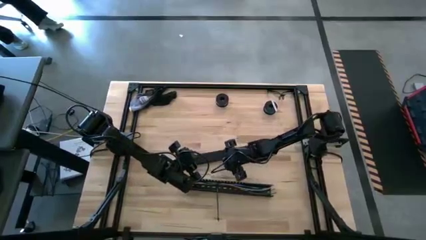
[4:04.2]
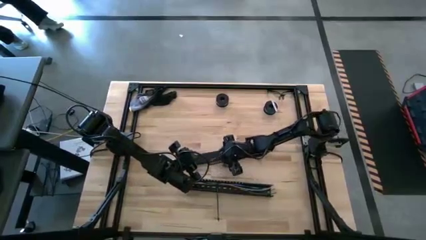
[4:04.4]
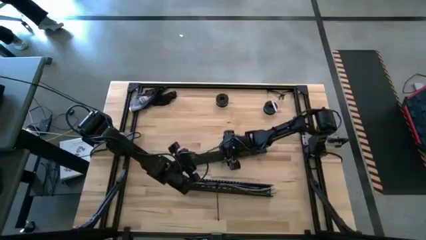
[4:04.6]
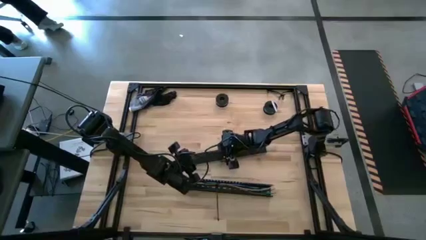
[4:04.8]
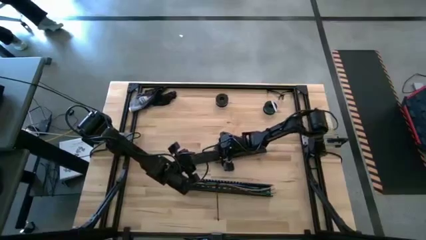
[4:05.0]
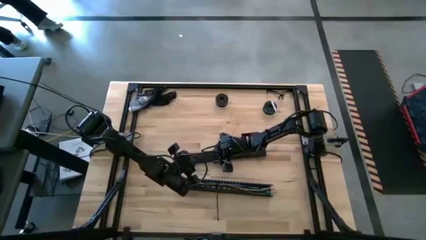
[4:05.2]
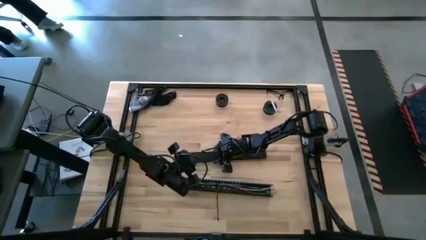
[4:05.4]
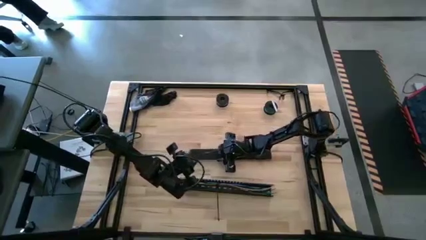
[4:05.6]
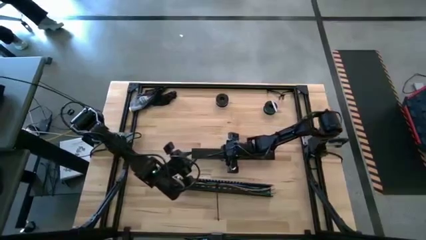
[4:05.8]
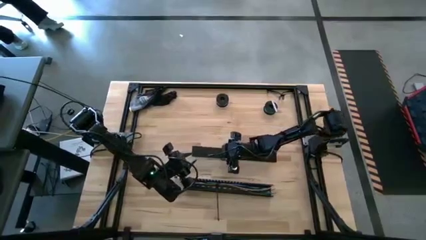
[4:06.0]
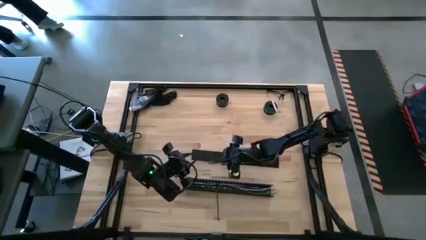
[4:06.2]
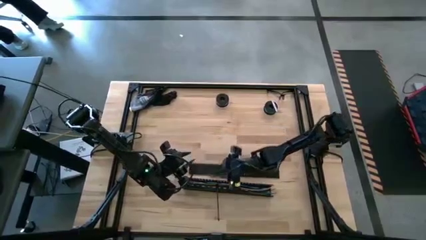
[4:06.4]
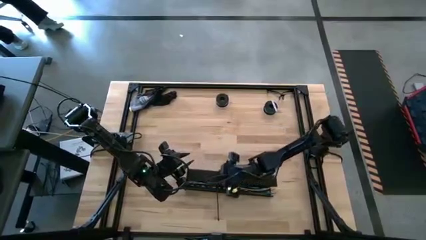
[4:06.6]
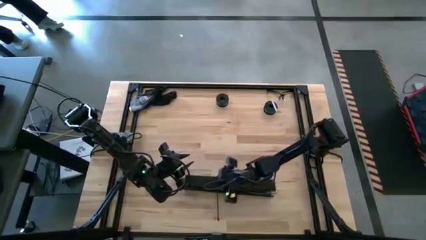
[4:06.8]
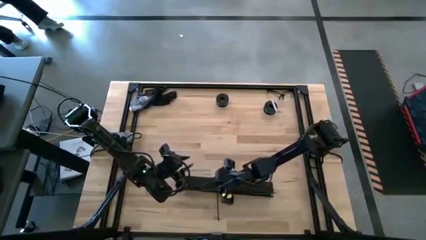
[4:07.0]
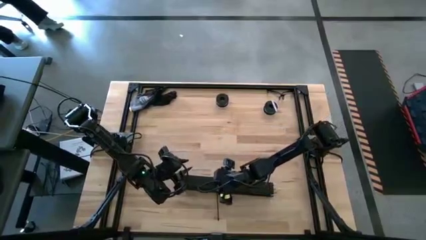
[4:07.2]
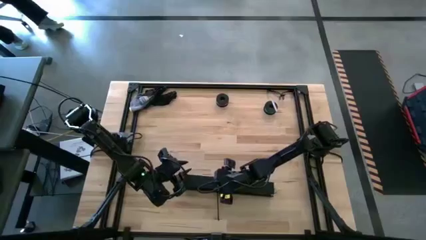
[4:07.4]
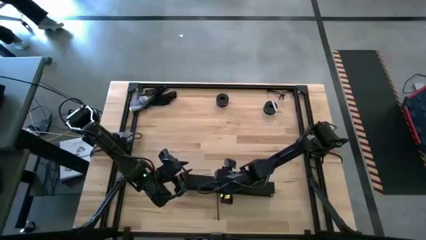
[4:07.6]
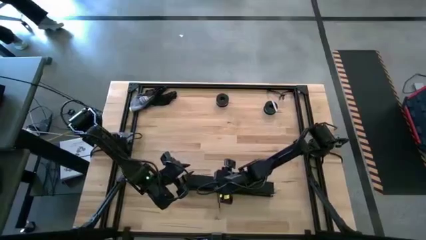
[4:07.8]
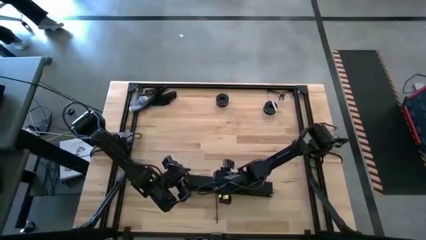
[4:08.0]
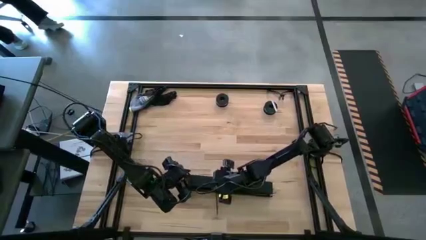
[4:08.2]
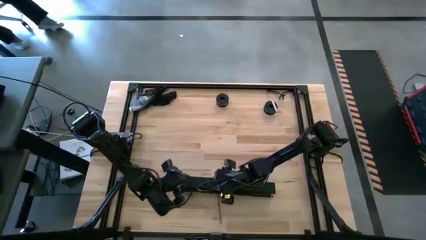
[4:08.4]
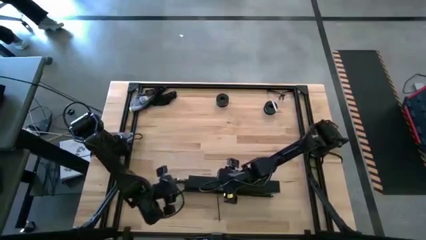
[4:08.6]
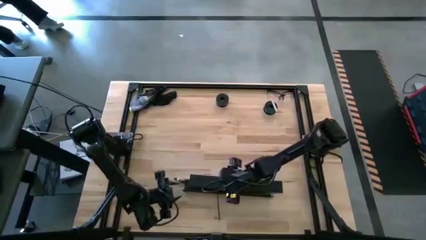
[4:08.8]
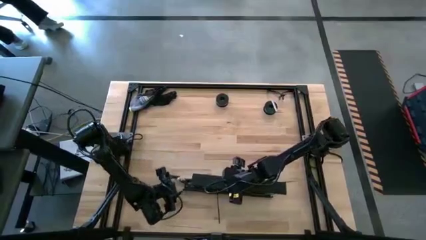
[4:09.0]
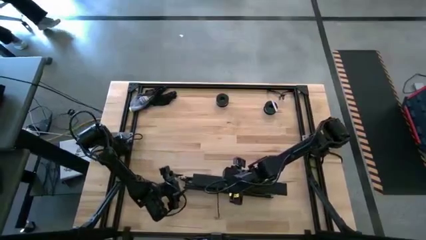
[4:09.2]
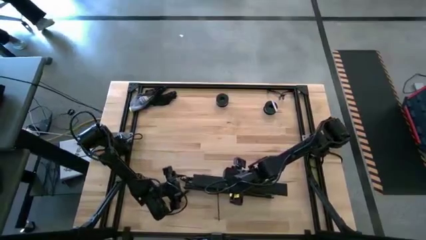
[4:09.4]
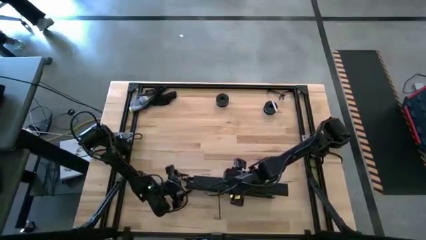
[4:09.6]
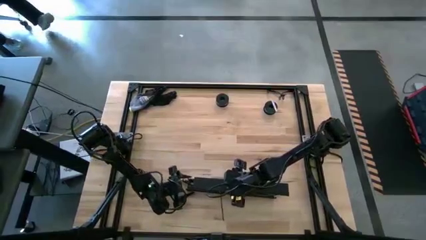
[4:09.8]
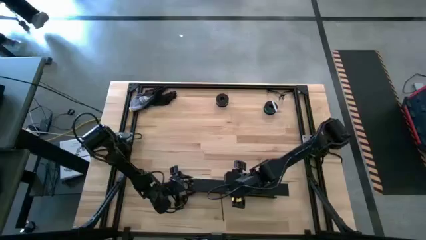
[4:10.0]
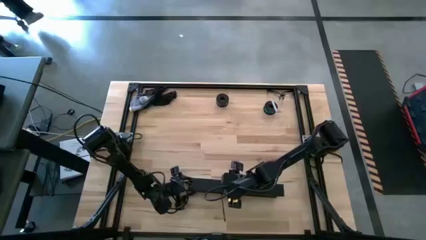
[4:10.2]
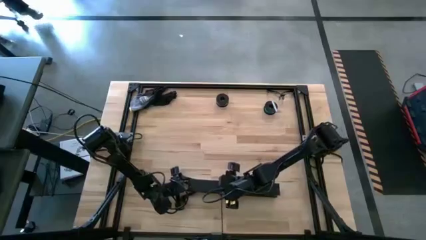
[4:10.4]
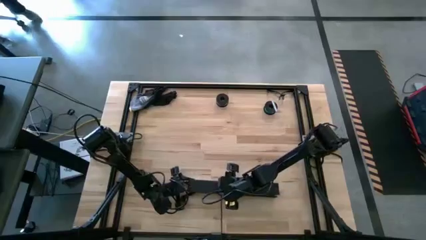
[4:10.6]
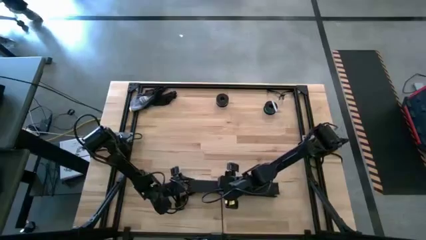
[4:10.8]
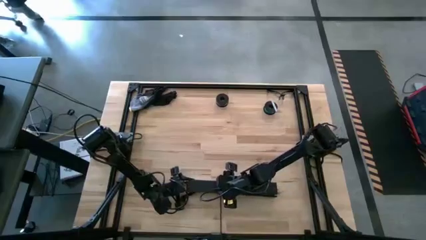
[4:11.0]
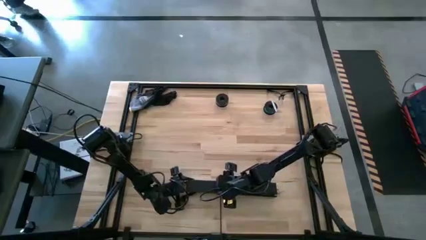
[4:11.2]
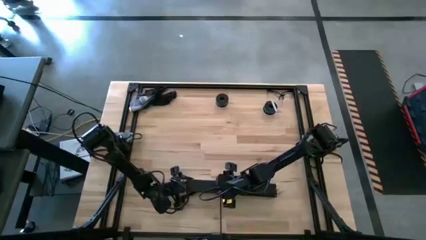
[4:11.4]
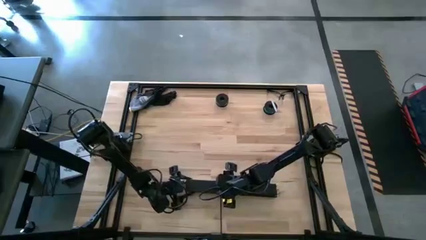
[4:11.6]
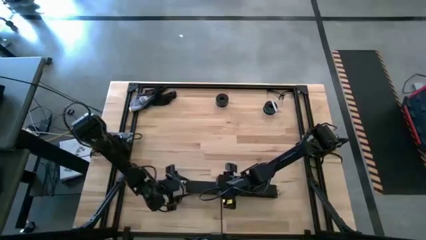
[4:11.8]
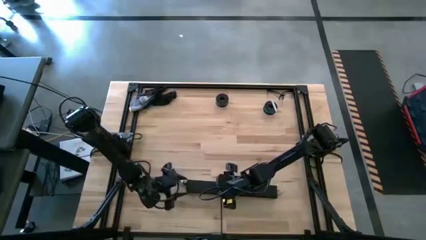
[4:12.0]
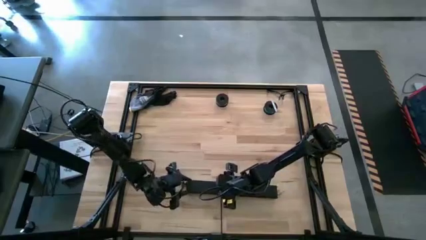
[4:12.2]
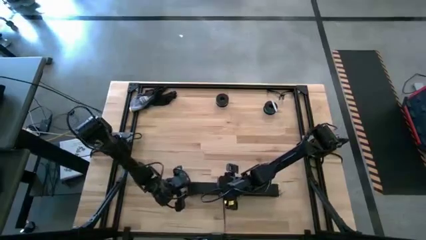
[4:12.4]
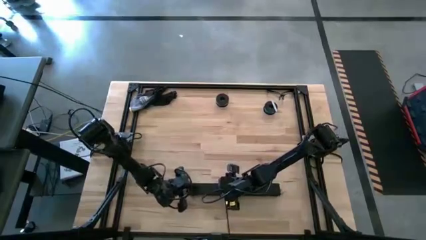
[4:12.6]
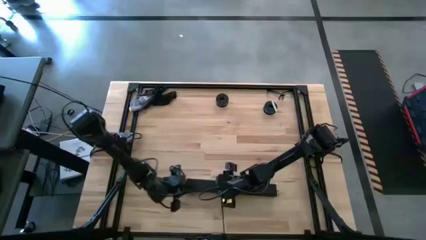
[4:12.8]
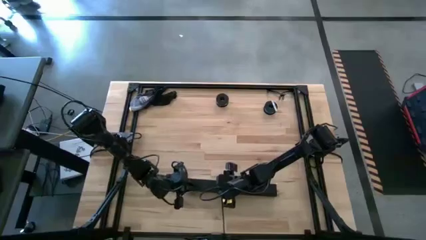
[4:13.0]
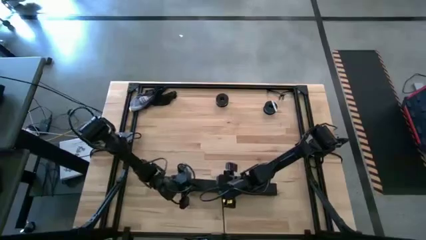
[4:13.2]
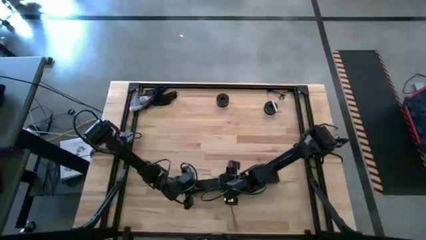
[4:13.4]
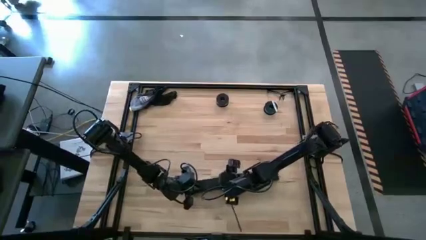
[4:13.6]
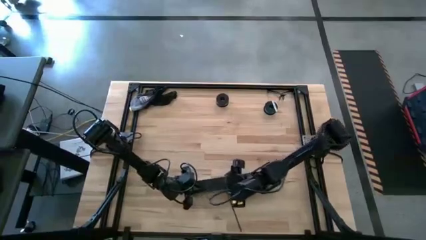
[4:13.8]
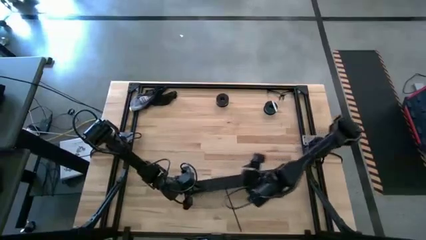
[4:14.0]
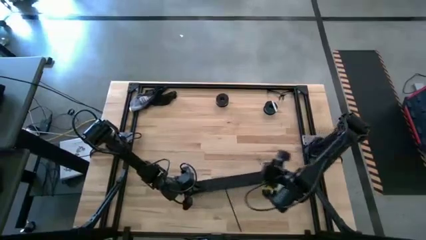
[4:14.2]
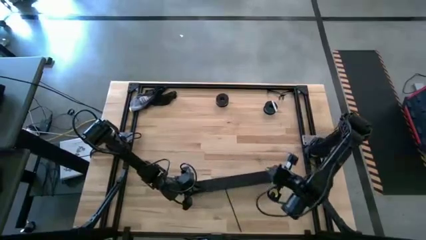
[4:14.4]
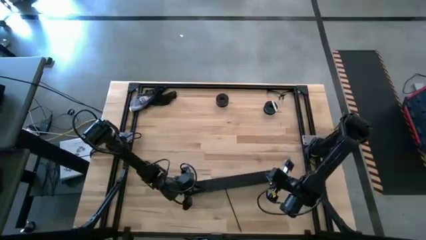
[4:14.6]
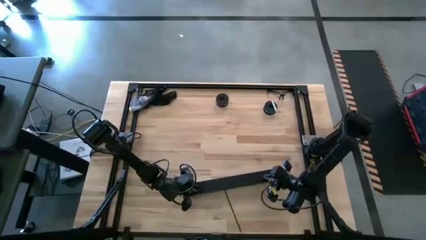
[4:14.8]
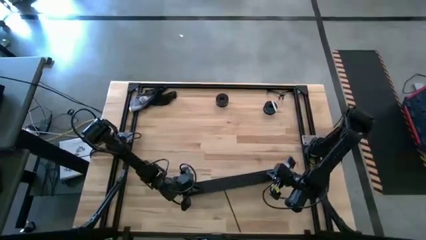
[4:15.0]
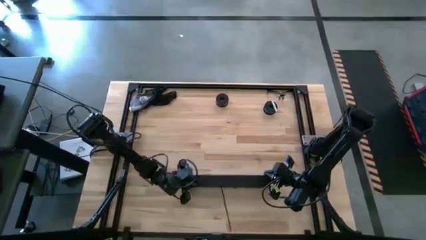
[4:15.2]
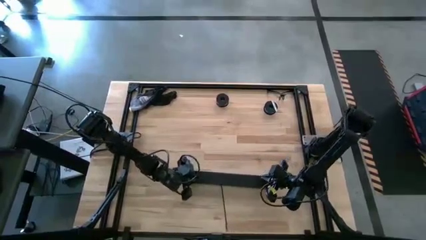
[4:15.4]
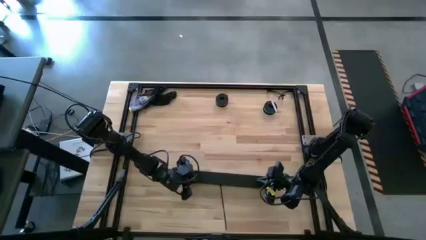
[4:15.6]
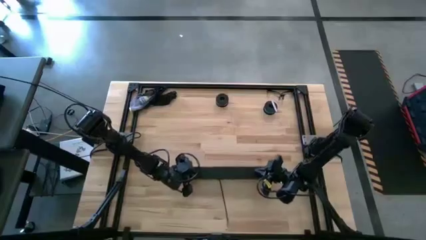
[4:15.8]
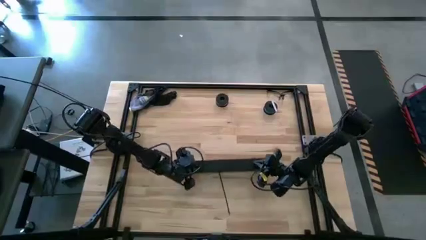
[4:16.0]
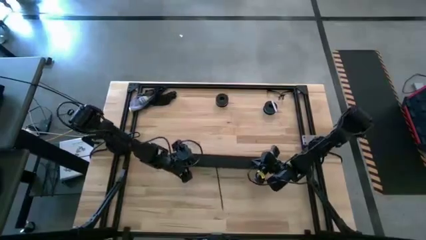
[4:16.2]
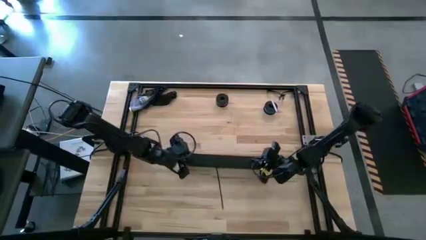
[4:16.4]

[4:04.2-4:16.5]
Task: Ziptie cables
Close the black cable duct

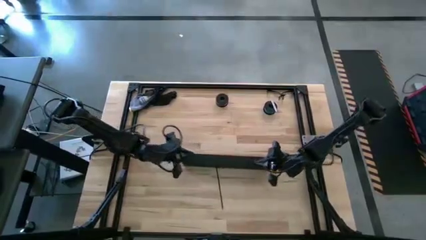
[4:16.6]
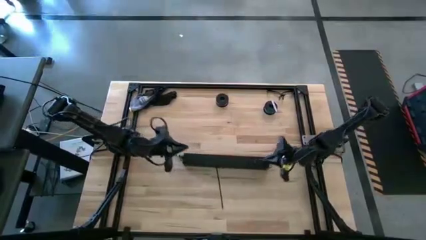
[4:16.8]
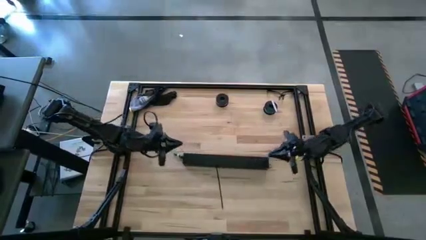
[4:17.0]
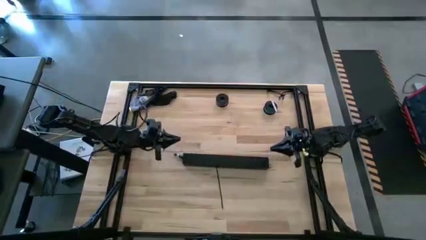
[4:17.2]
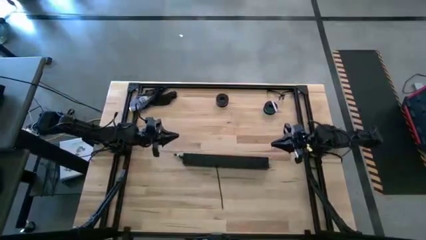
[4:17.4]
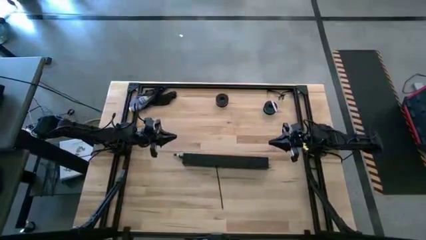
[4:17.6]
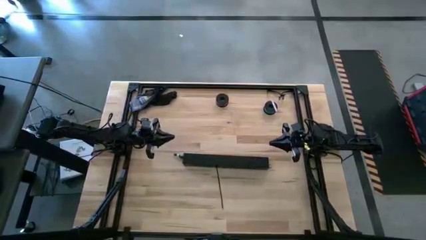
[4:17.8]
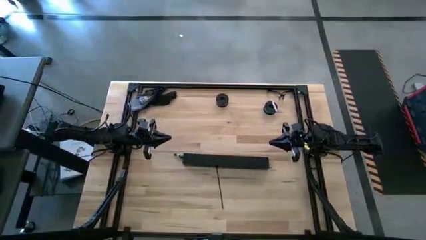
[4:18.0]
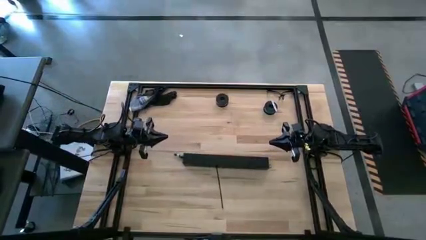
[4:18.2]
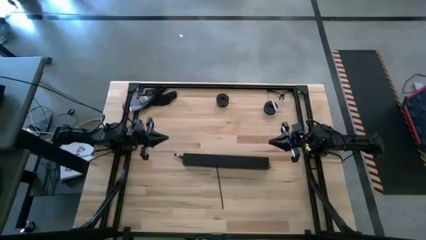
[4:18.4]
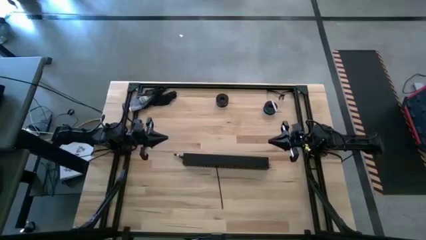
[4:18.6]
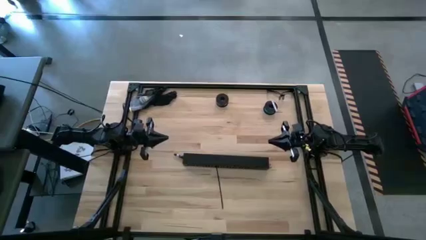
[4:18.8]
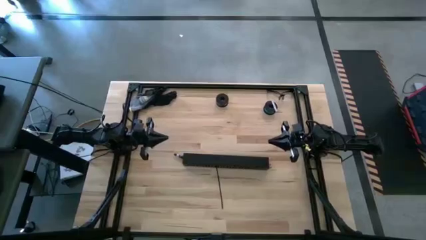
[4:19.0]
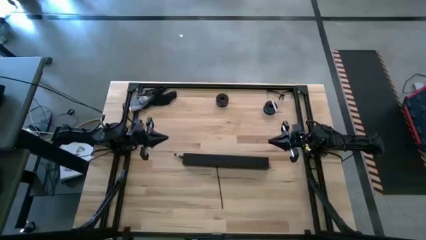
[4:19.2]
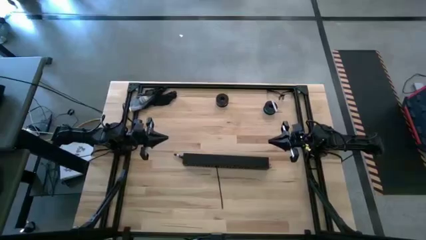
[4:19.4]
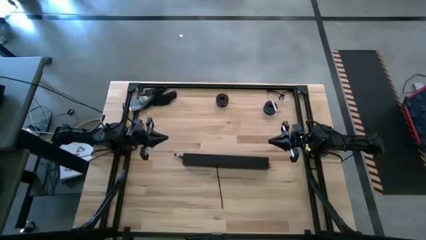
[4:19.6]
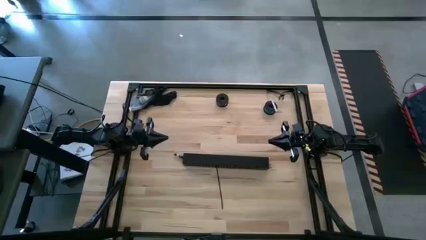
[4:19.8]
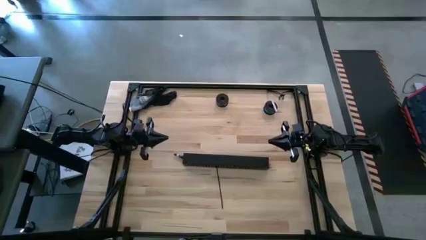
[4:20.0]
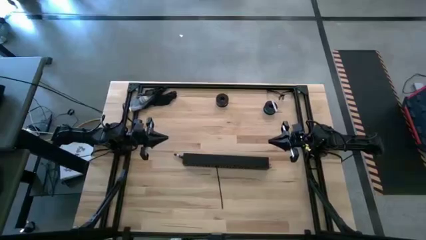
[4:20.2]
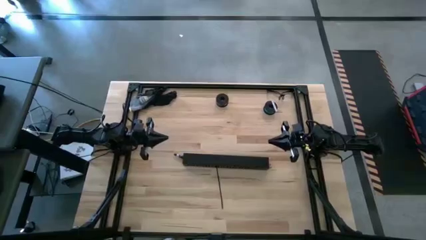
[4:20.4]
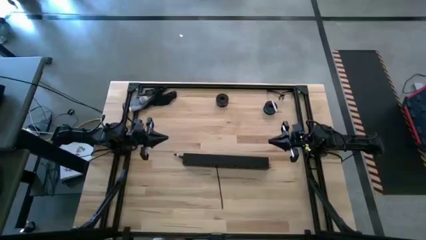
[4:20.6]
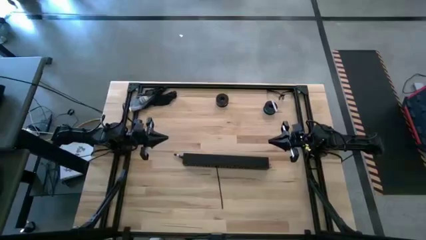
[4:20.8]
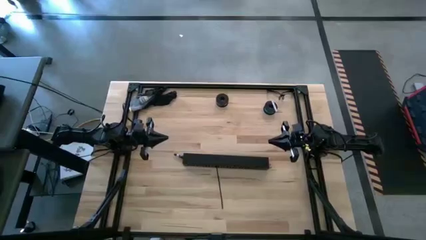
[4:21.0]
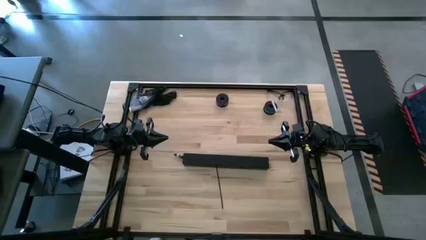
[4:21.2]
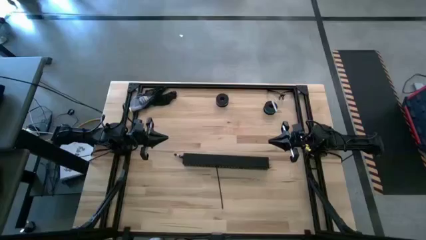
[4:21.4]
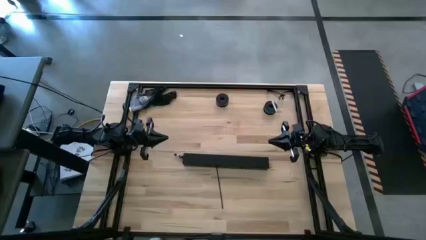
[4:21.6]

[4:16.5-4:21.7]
Return to Home Position
